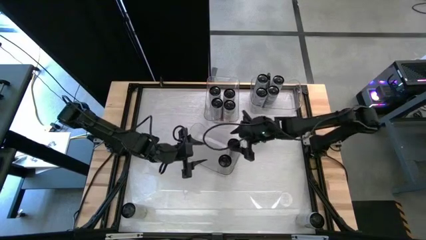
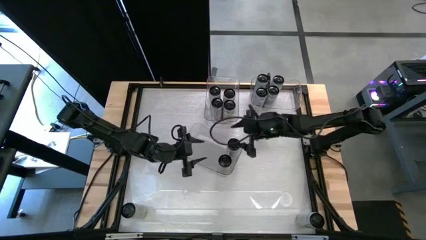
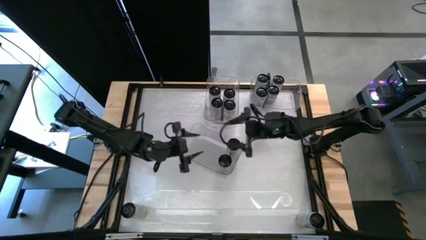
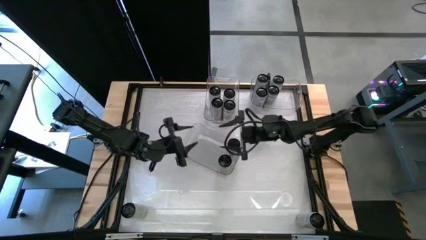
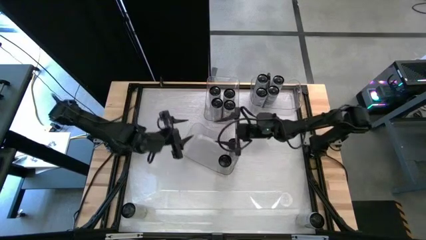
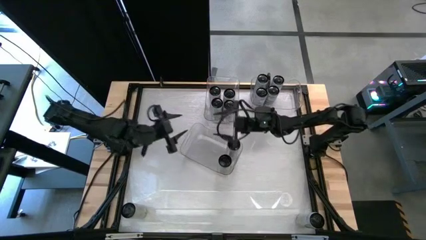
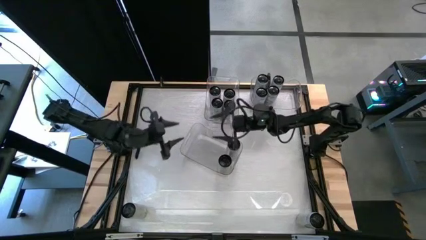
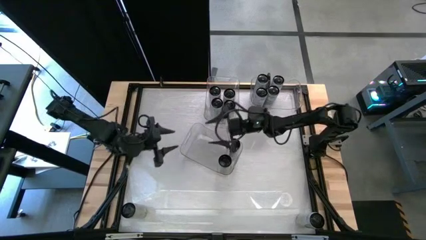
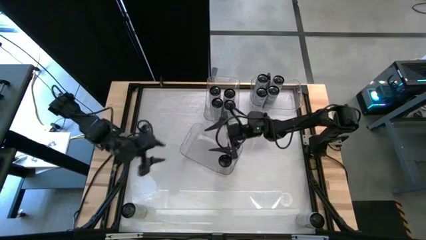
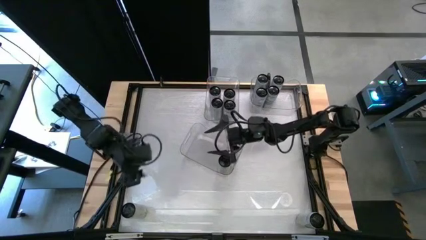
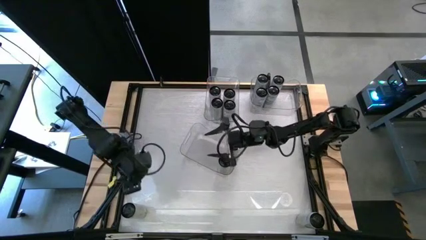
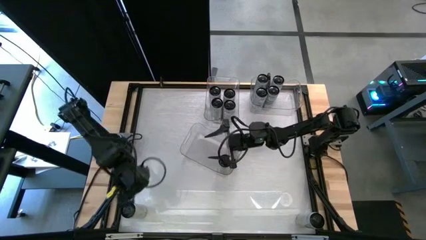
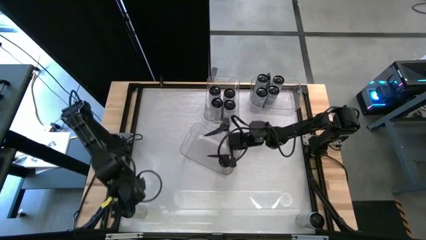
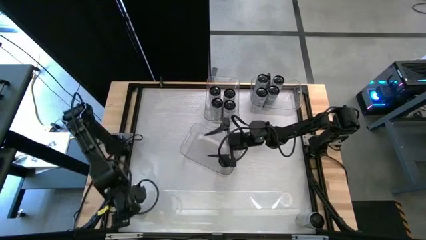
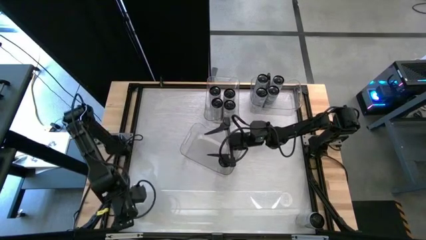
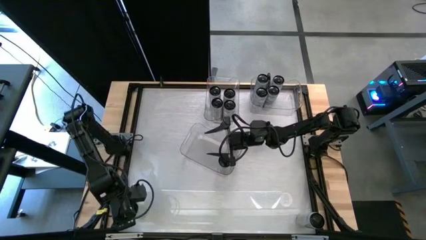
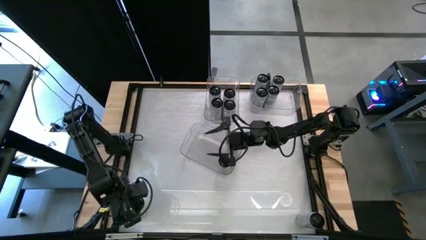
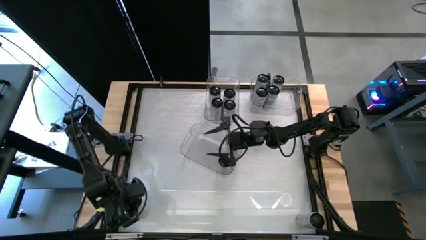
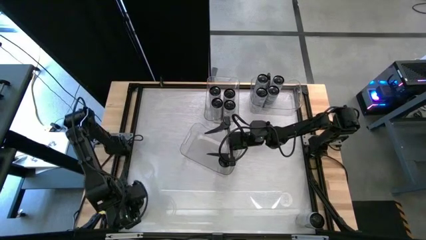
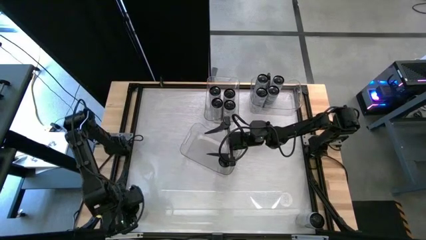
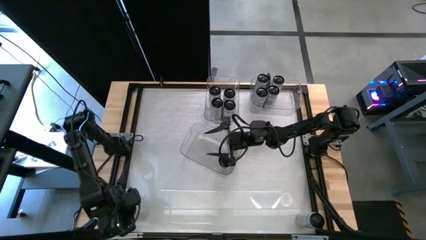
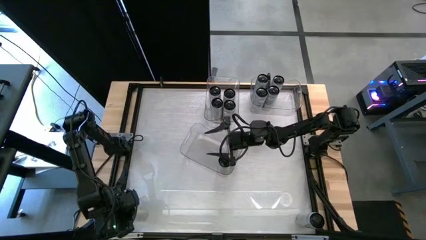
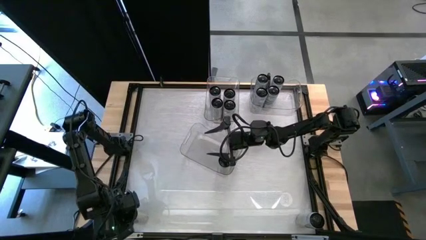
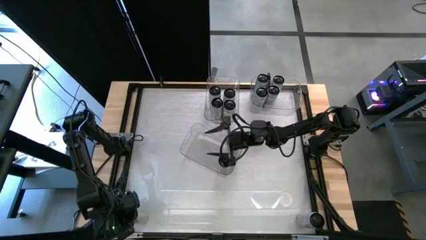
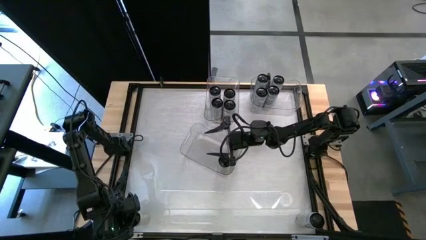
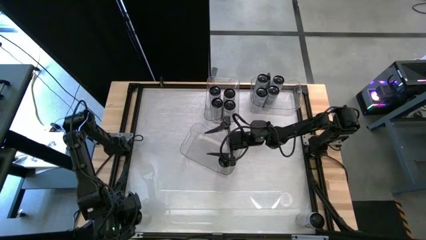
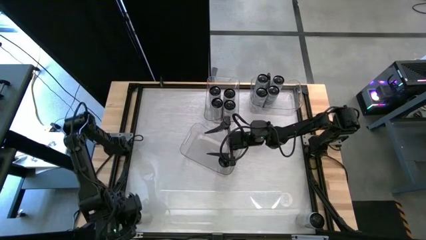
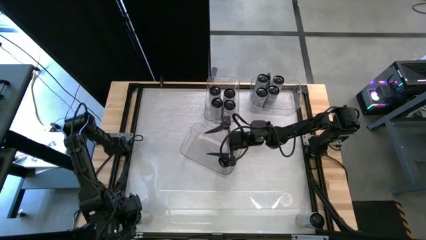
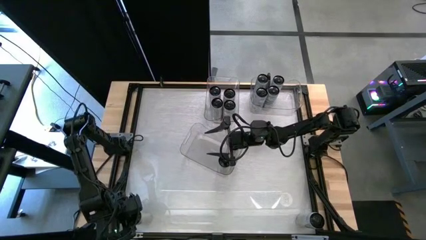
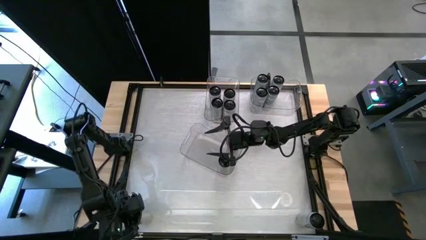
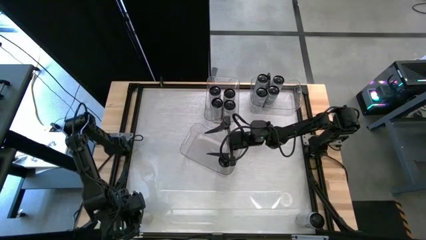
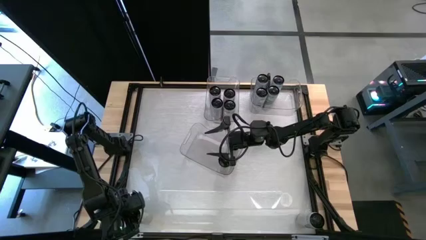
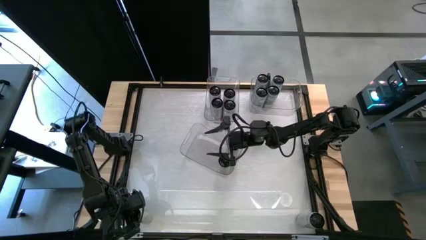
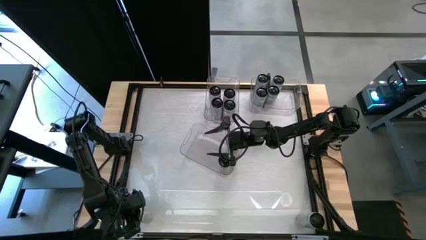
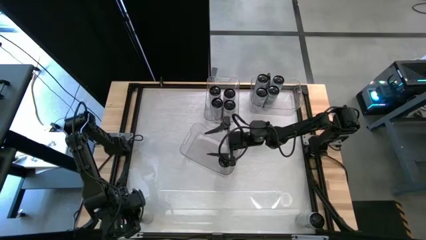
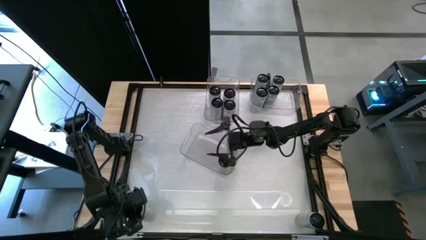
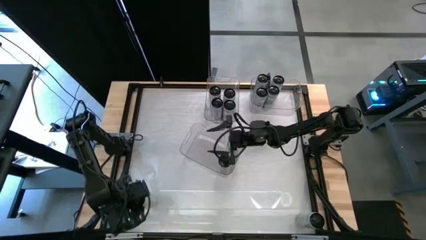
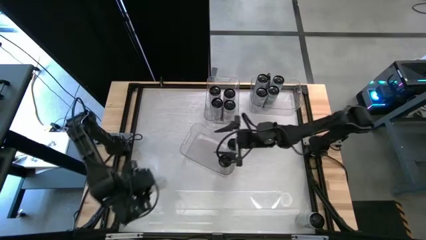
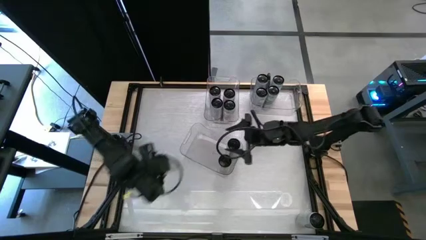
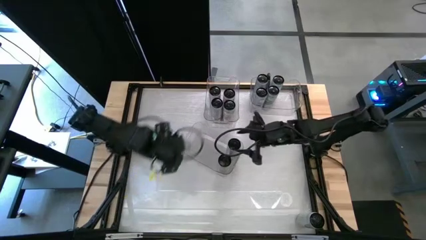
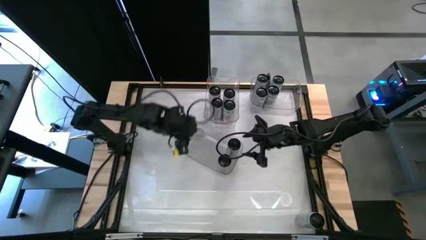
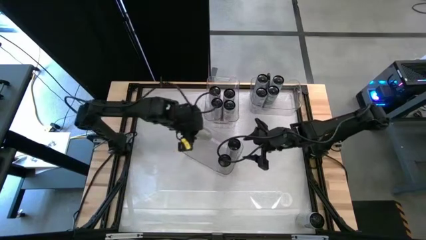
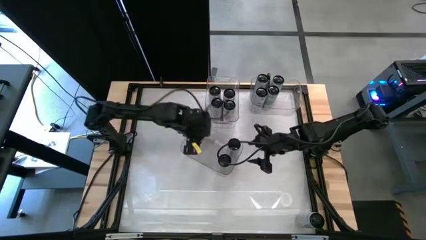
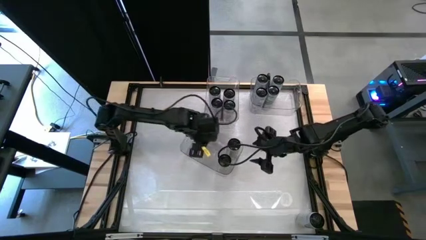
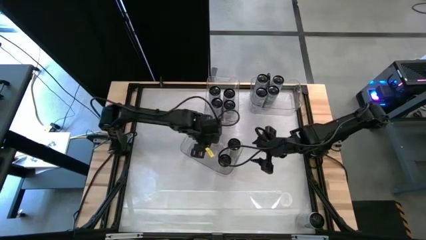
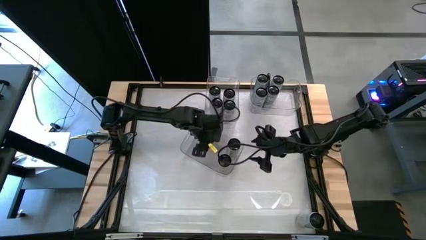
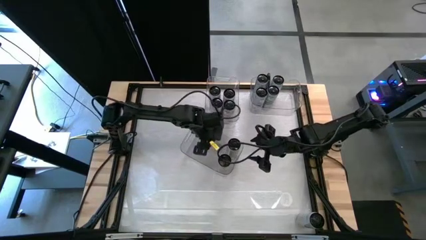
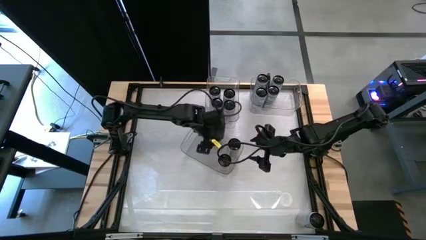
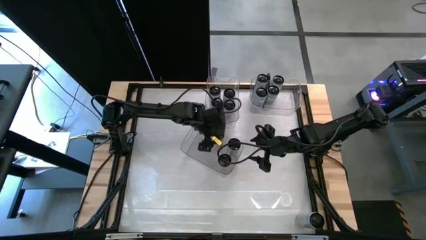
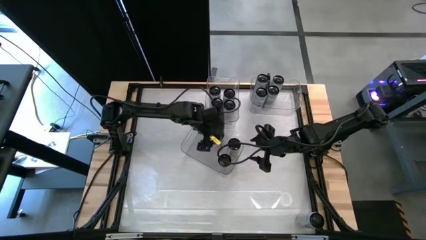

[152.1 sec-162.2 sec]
Task: Sort soda cans
Put the white-yellow can into the bottom transparent bin

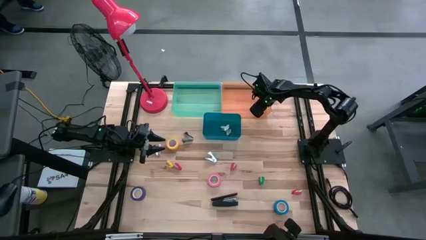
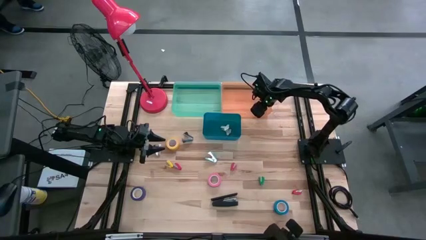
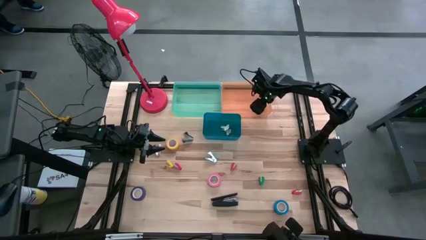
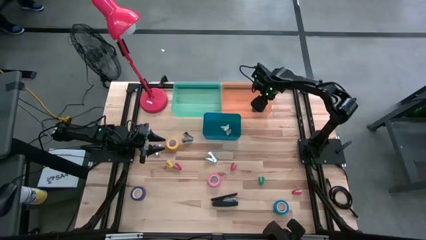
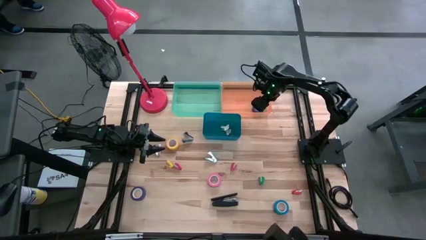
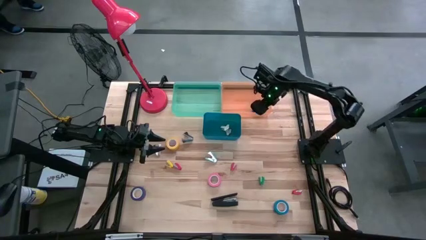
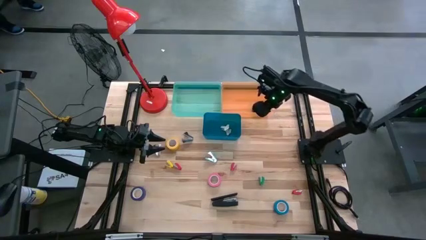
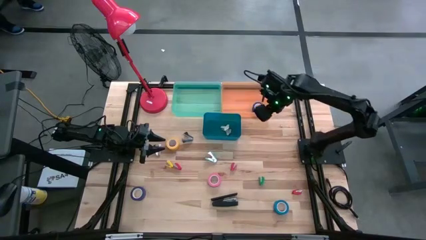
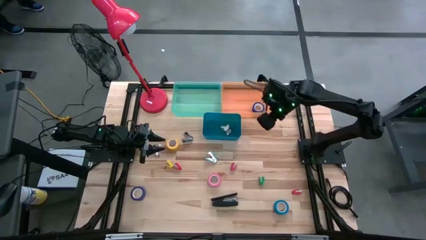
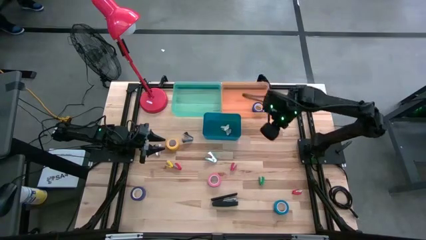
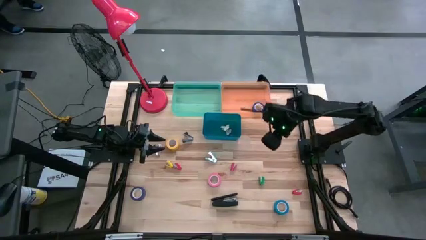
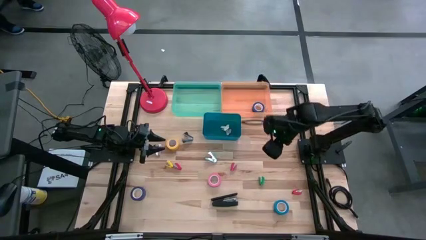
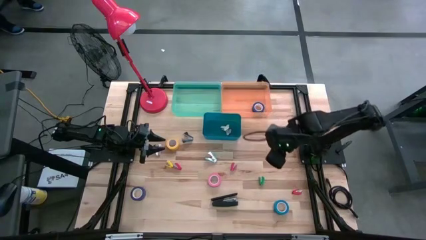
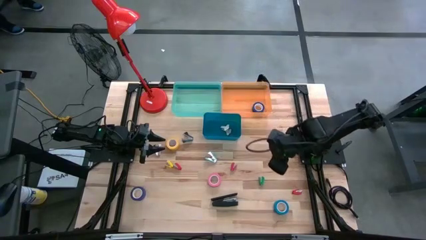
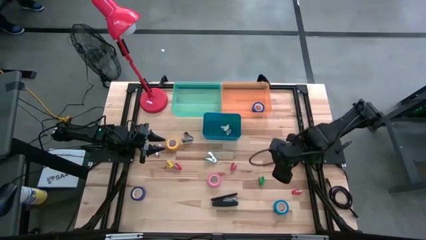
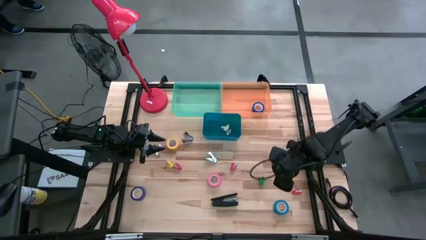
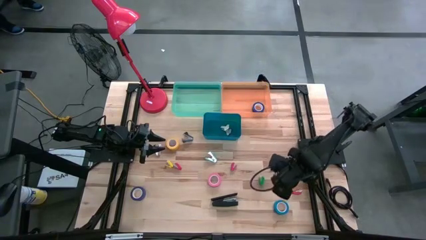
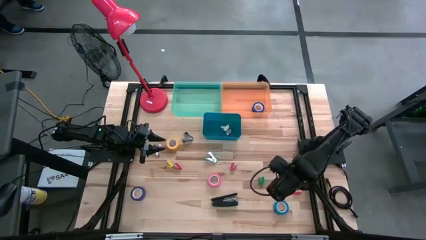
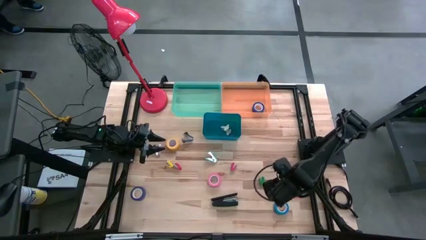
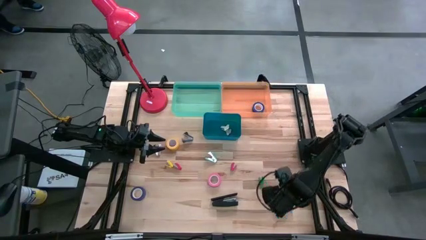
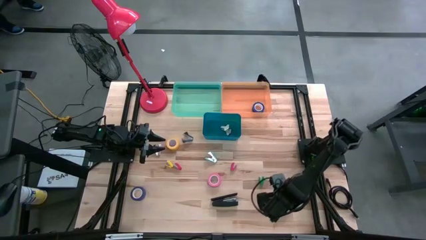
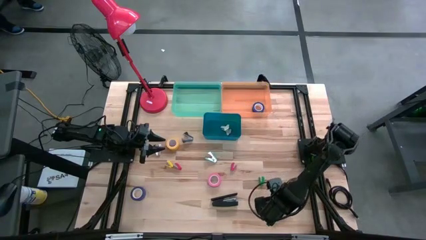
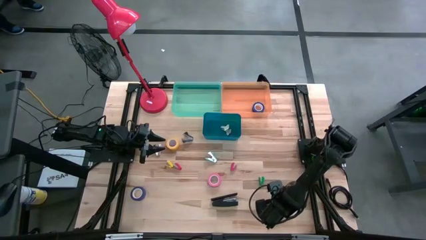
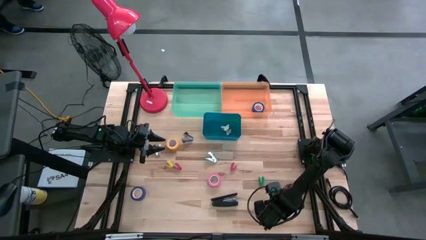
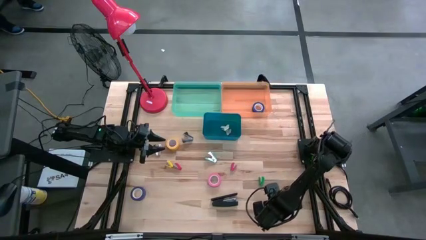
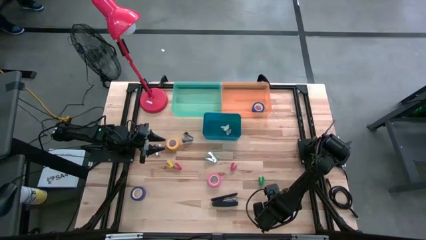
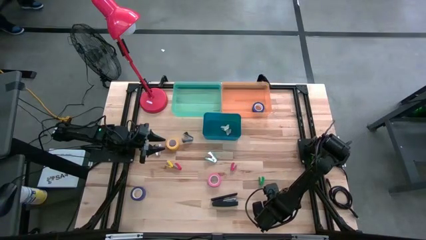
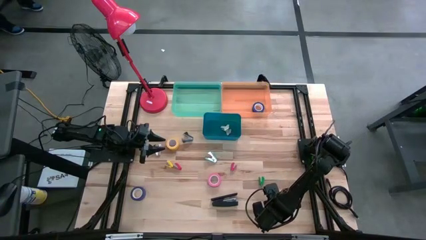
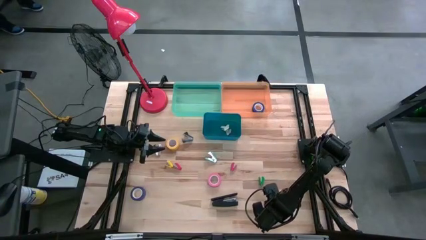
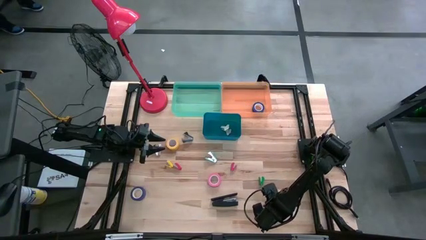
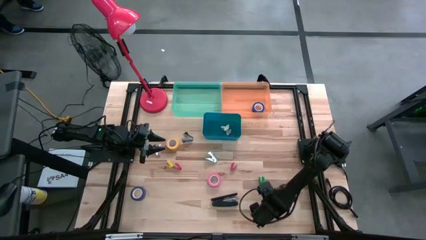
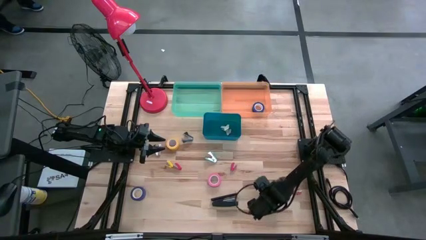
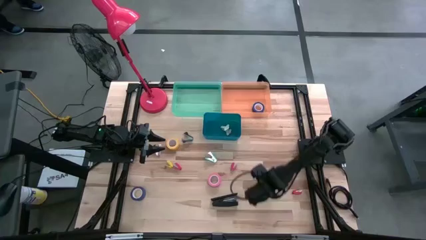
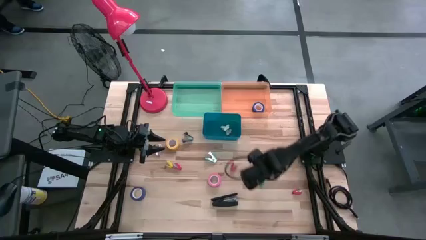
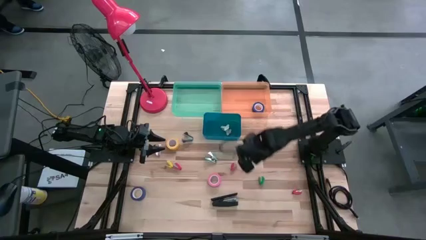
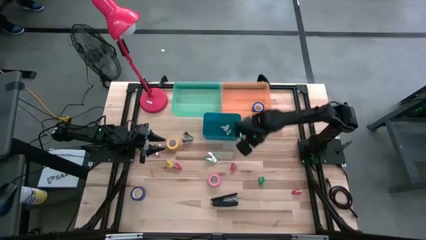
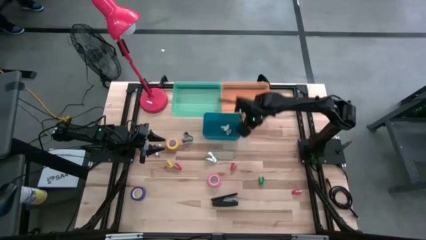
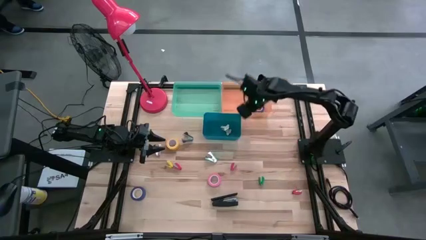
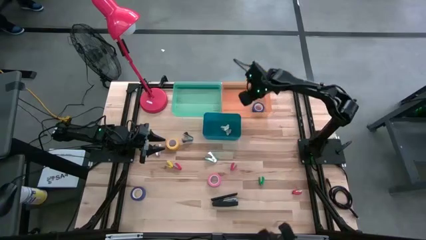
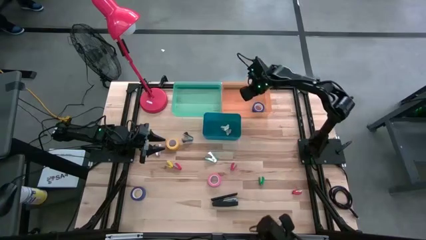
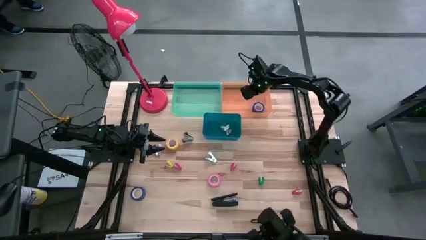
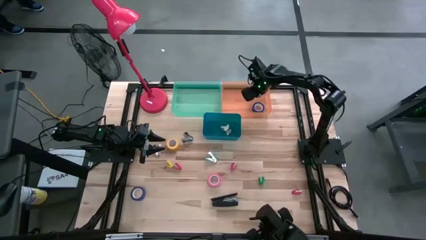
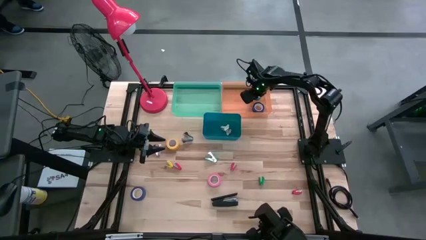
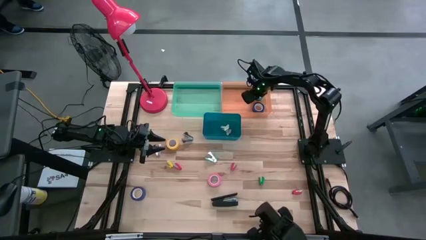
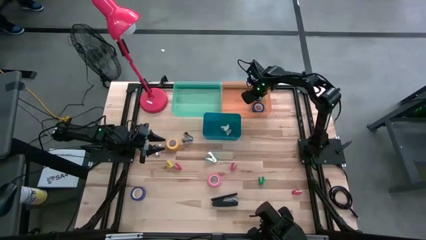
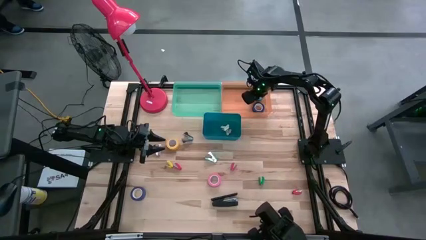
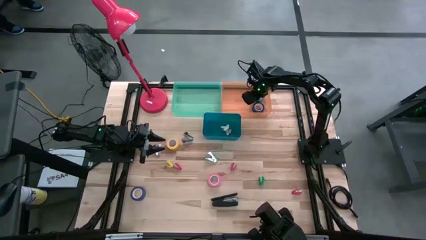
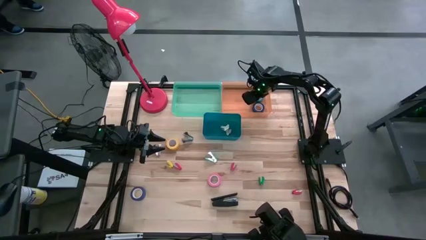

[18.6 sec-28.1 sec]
Task: Pick and place Stapler, Stapler remover, tape
Put the light blue tape into the orange bin
